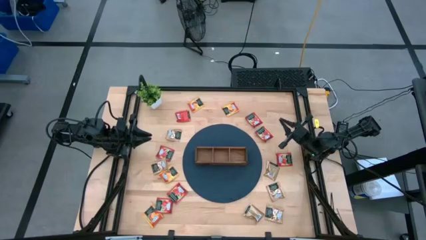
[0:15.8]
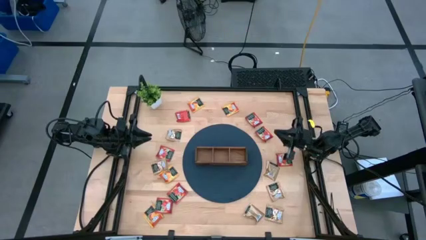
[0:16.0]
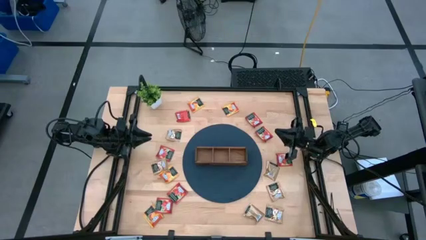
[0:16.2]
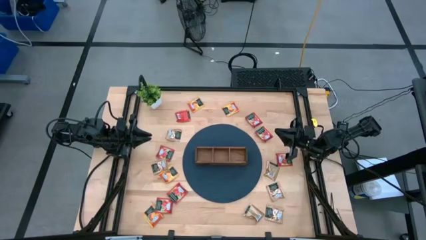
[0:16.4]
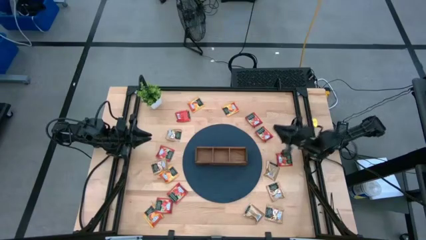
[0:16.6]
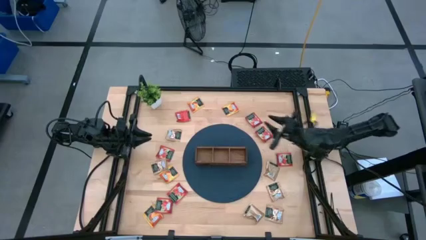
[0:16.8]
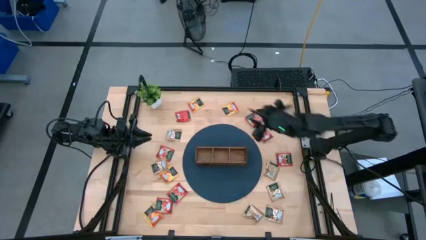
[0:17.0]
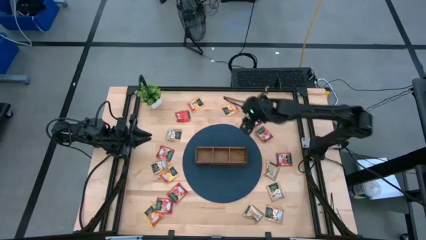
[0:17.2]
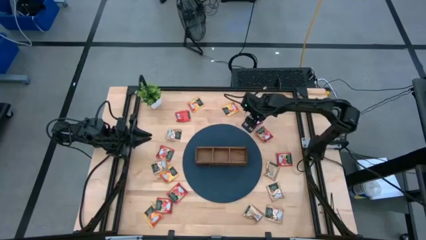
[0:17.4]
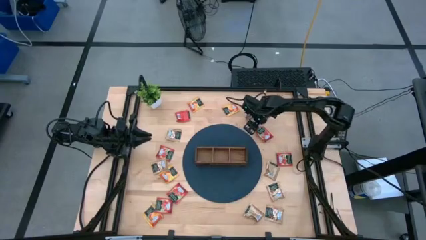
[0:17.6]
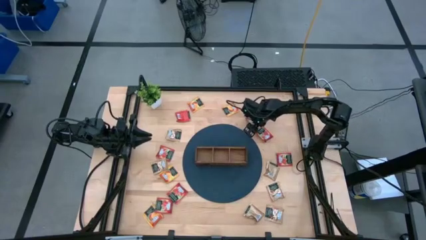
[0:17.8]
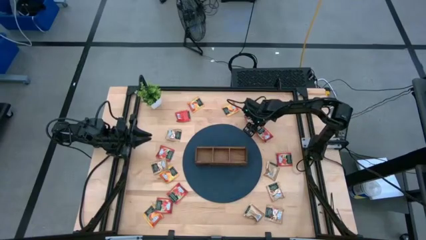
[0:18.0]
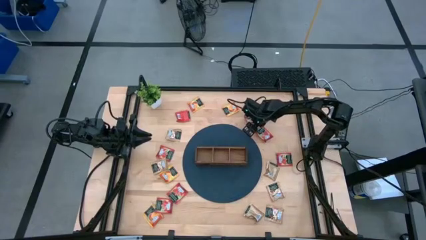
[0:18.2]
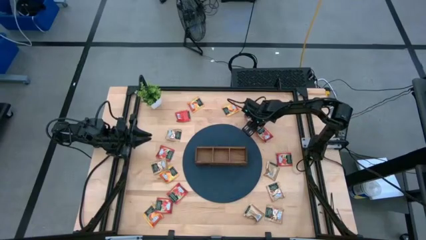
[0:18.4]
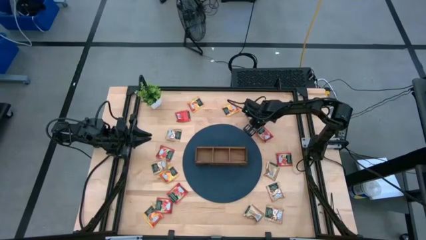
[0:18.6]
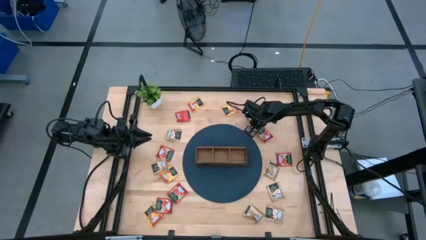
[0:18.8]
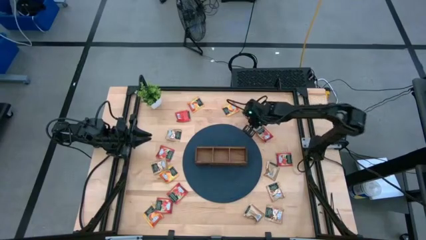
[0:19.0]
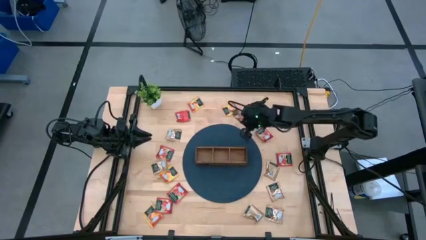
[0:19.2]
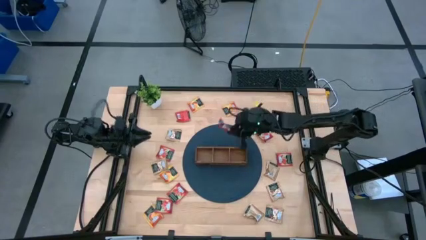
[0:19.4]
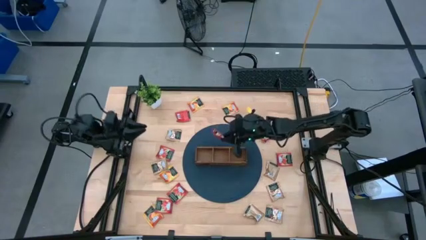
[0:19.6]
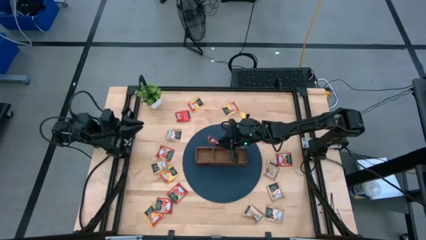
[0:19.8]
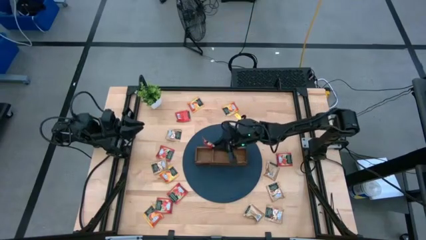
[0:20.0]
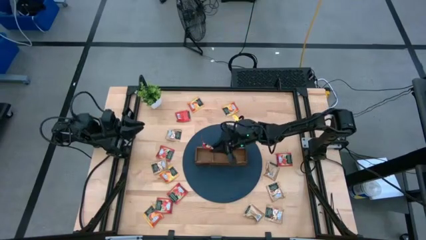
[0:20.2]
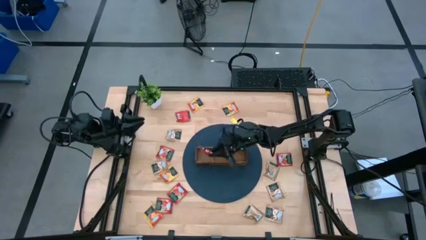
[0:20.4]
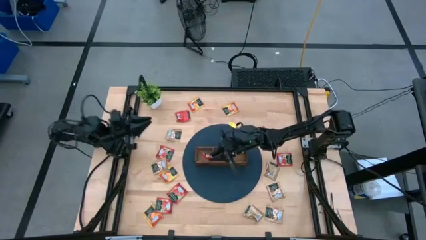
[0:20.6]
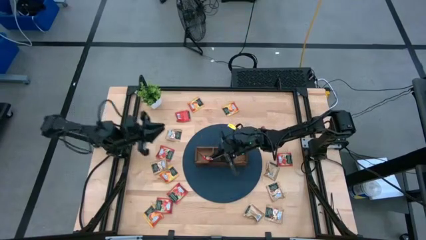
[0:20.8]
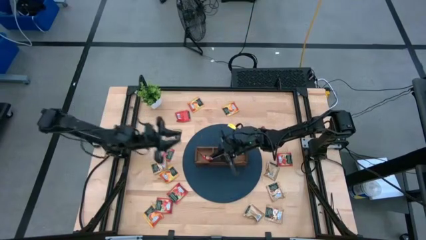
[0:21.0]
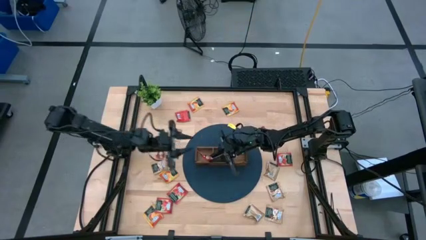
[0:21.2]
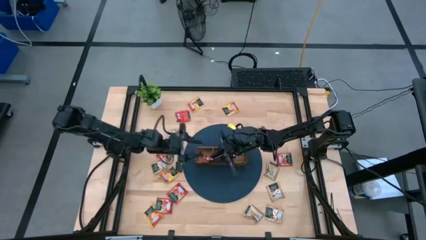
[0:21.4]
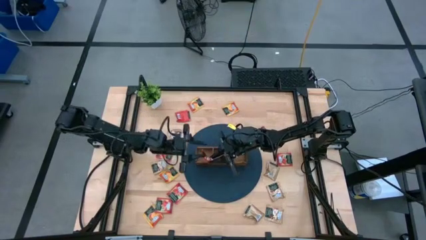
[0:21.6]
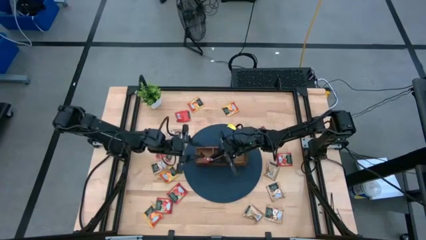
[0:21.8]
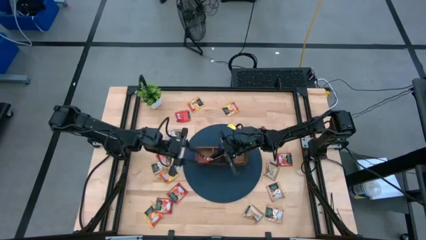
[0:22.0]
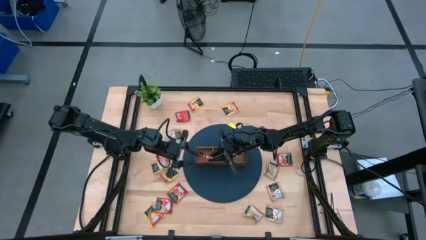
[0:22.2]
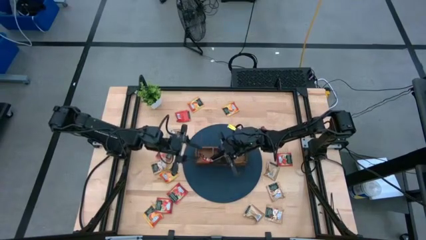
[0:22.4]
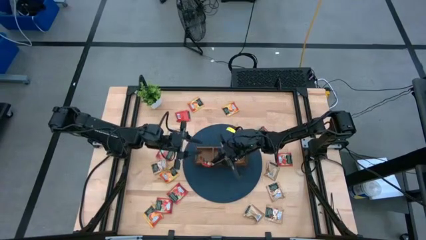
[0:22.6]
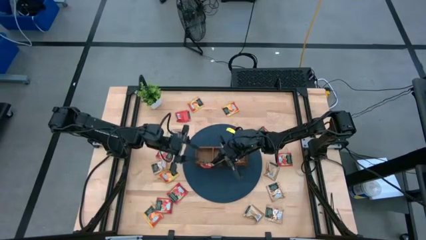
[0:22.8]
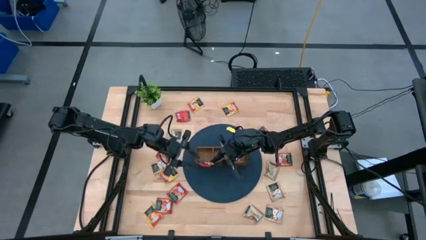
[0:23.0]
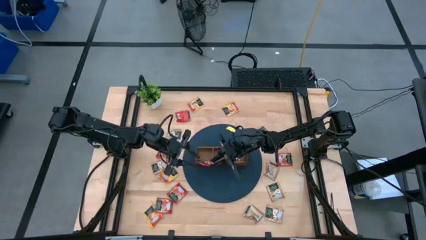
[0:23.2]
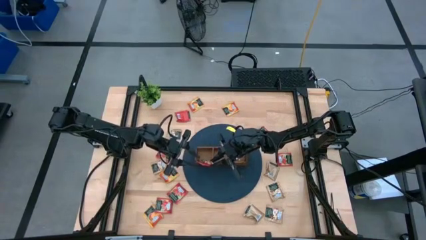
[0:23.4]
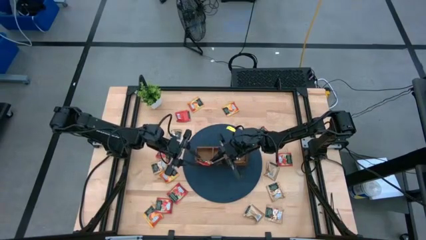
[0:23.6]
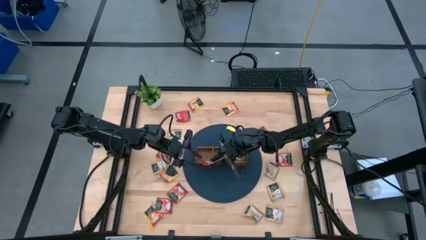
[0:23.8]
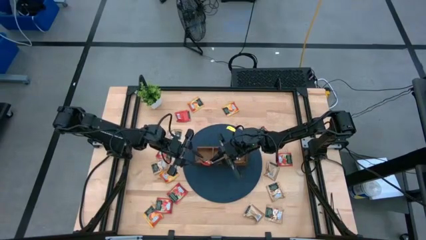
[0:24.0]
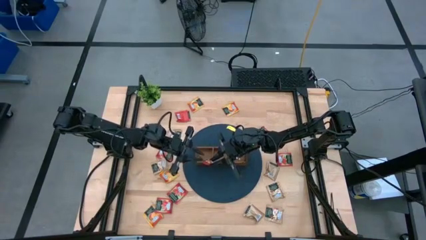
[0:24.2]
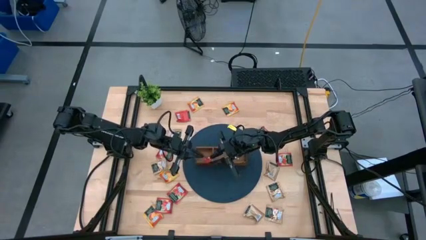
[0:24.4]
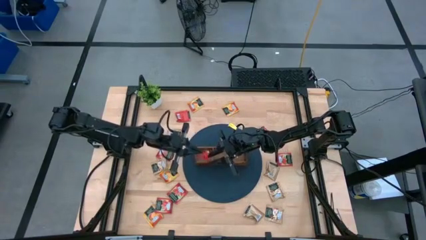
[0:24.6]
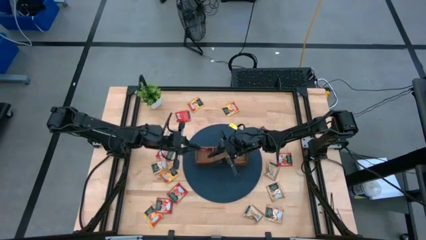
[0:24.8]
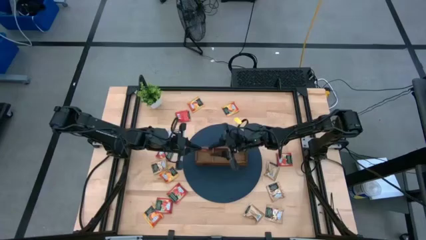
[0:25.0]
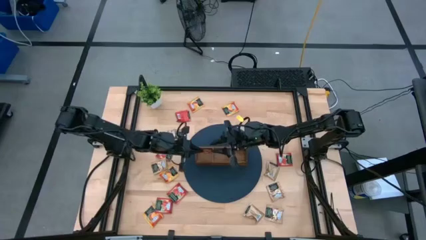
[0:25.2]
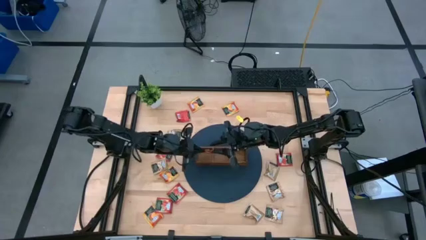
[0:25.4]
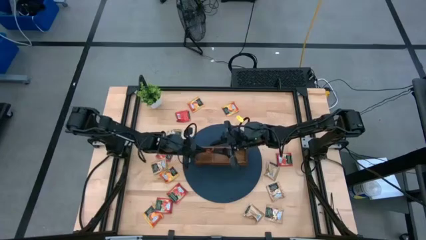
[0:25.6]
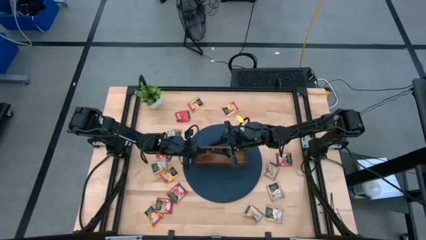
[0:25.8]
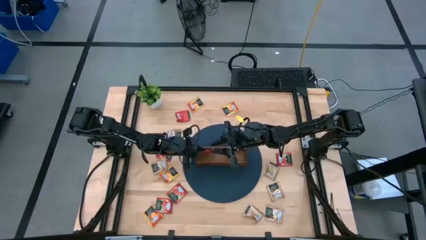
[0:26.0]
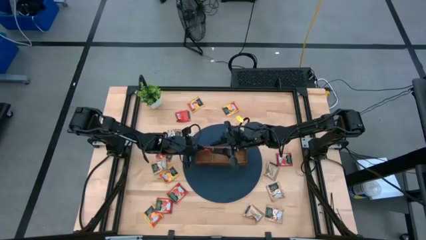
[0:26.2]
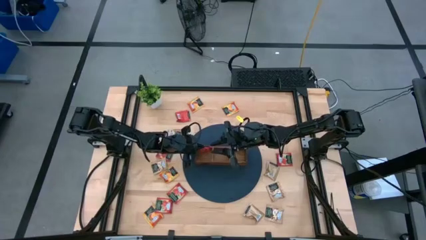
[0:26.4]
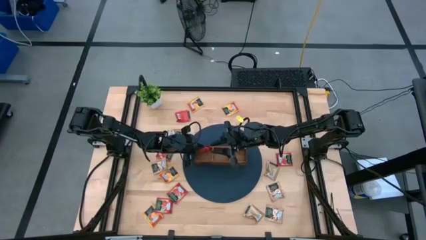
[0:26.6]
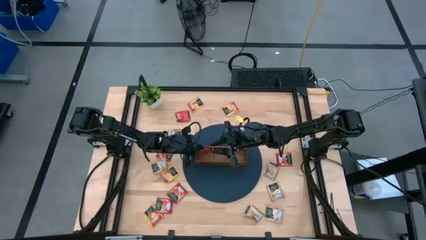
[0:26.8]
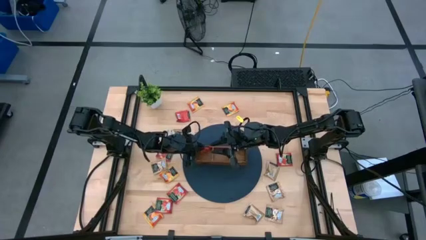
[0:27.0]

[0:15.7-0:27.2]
Task: Pick & Place Tea
Put the red tea bag into the left section of the wooden organizer
